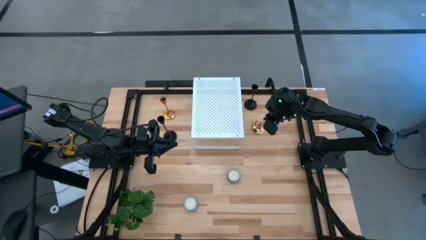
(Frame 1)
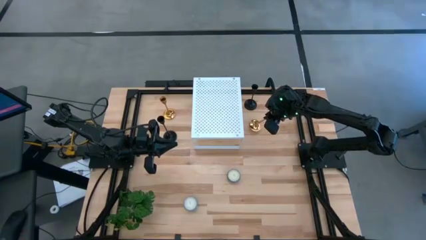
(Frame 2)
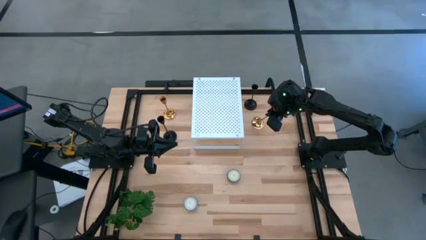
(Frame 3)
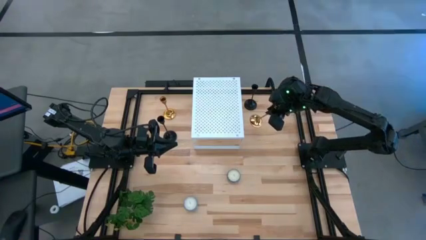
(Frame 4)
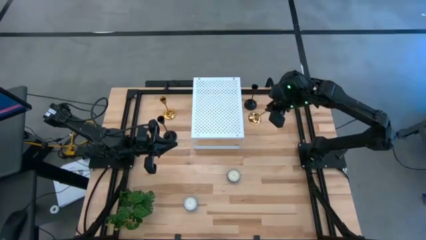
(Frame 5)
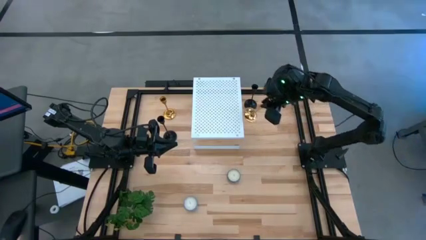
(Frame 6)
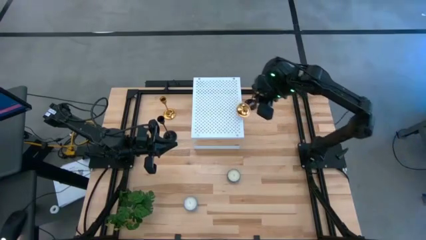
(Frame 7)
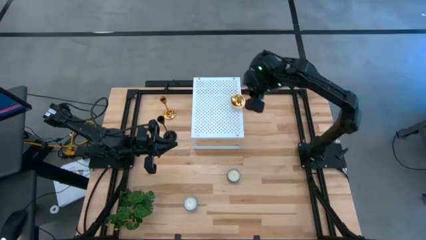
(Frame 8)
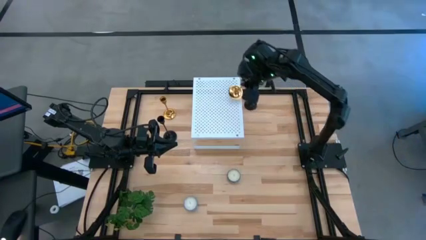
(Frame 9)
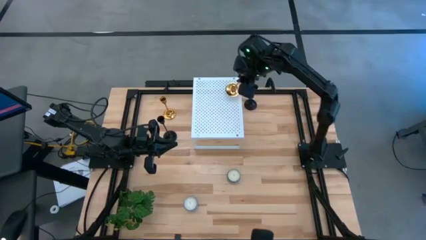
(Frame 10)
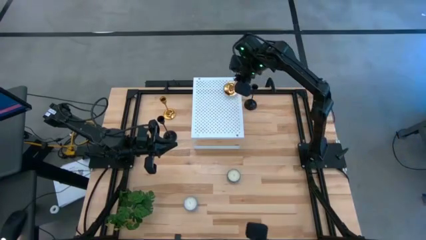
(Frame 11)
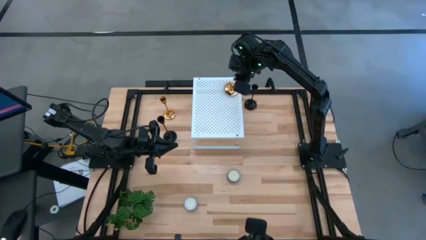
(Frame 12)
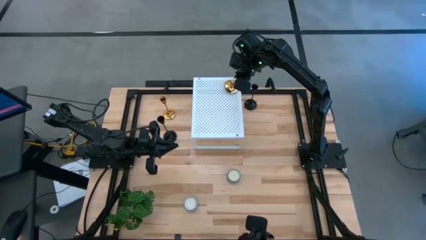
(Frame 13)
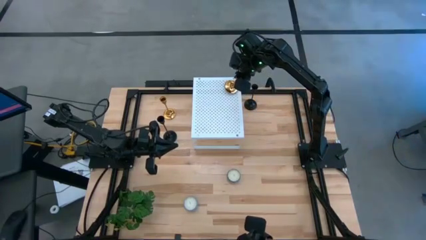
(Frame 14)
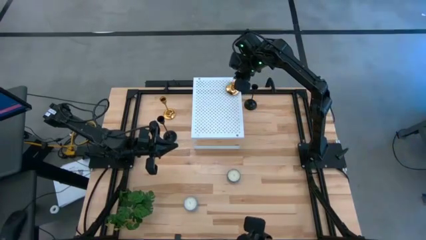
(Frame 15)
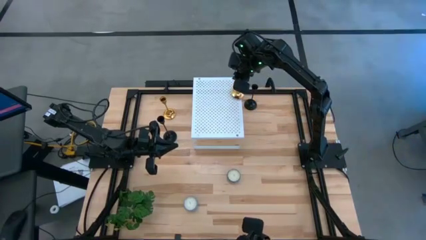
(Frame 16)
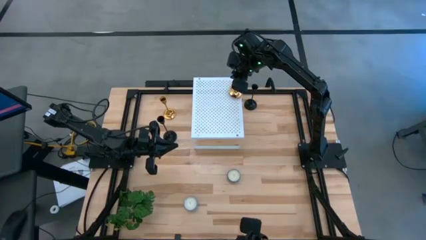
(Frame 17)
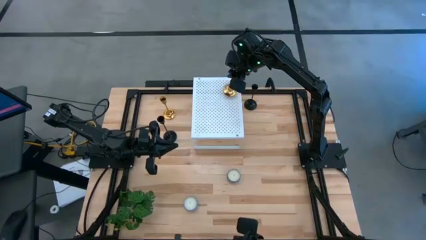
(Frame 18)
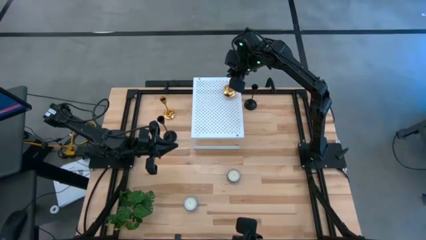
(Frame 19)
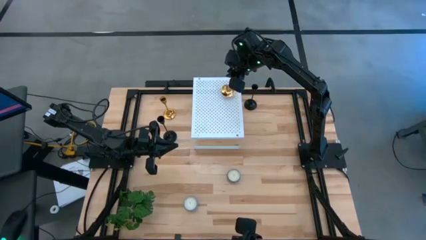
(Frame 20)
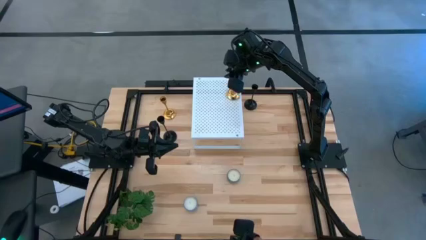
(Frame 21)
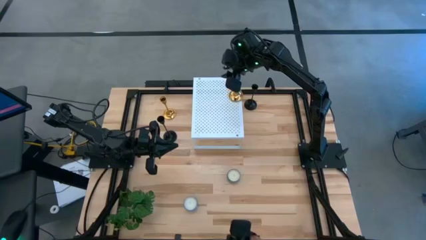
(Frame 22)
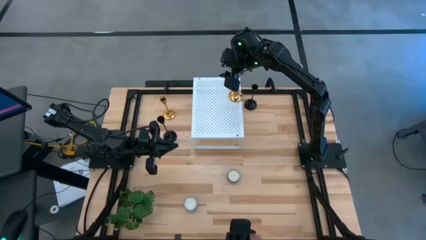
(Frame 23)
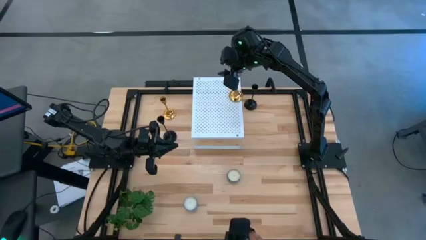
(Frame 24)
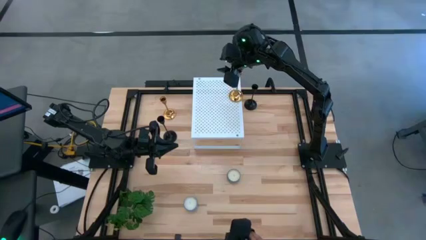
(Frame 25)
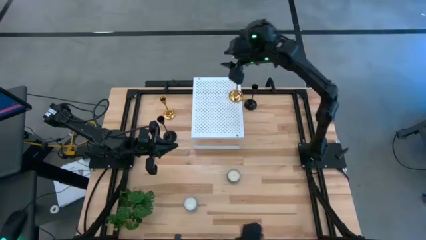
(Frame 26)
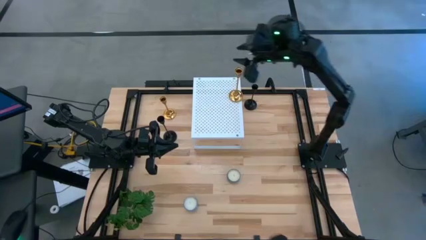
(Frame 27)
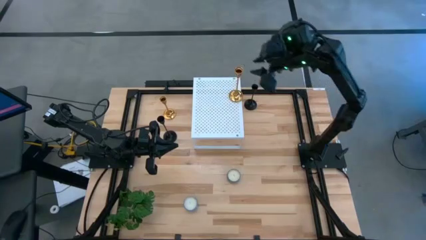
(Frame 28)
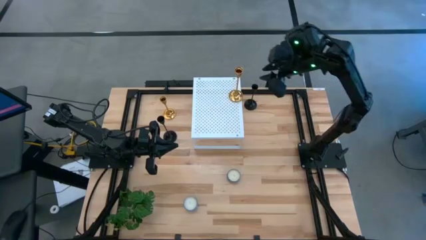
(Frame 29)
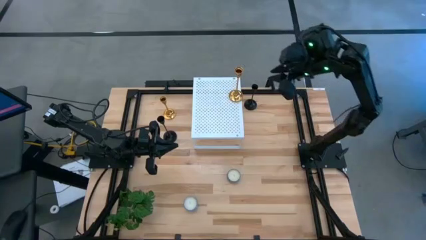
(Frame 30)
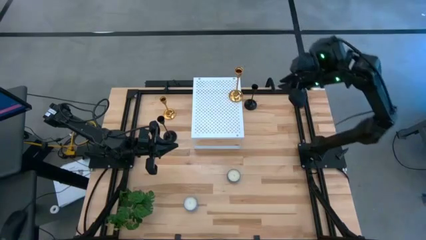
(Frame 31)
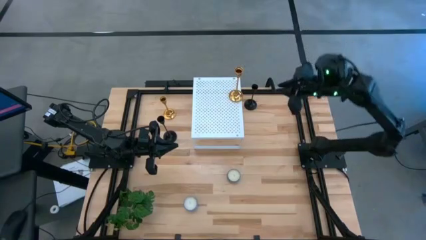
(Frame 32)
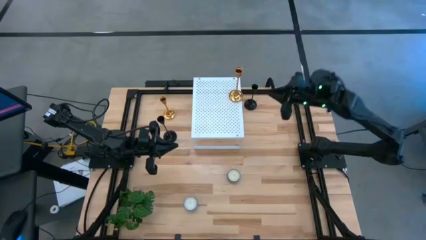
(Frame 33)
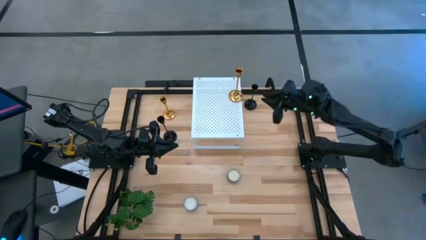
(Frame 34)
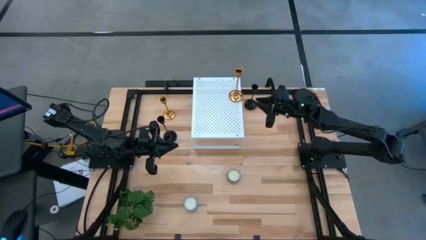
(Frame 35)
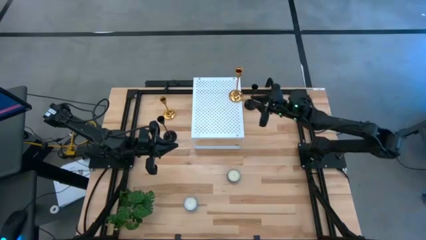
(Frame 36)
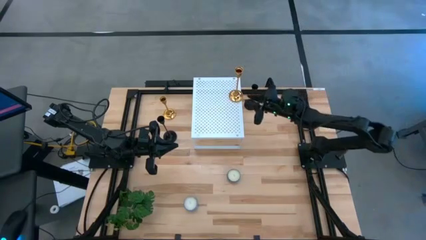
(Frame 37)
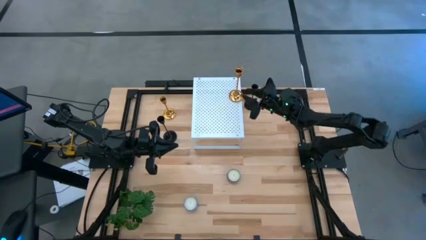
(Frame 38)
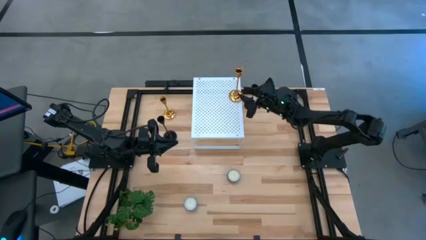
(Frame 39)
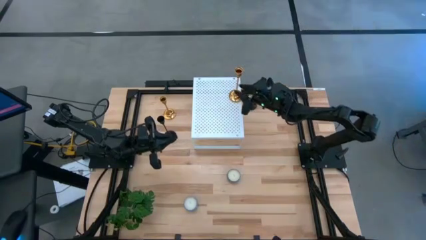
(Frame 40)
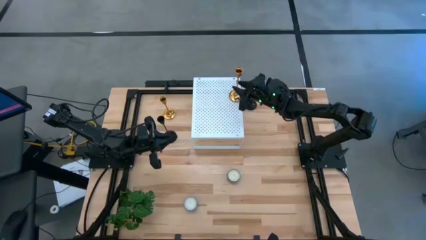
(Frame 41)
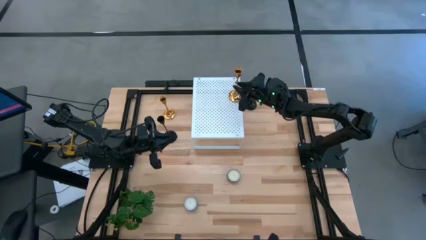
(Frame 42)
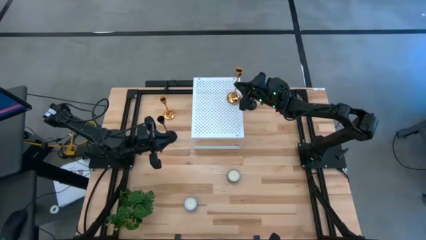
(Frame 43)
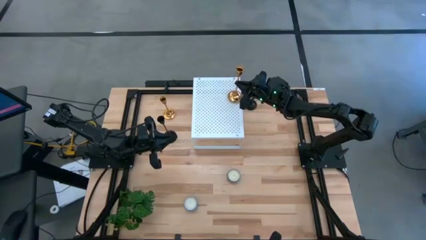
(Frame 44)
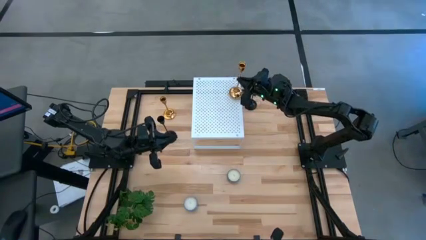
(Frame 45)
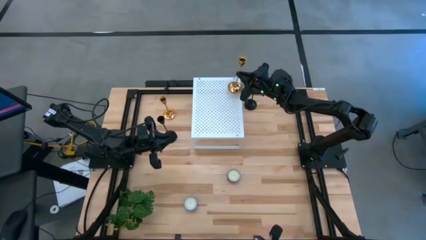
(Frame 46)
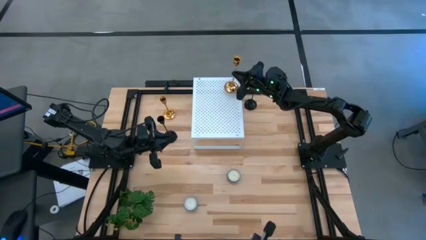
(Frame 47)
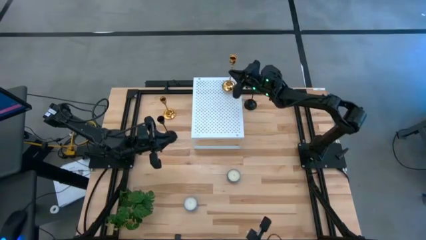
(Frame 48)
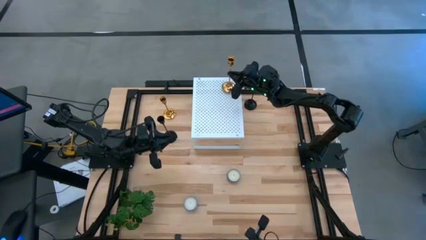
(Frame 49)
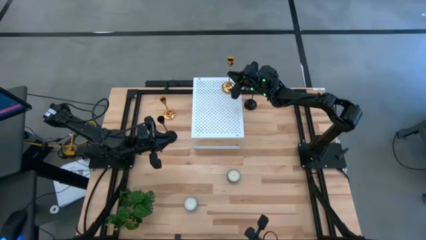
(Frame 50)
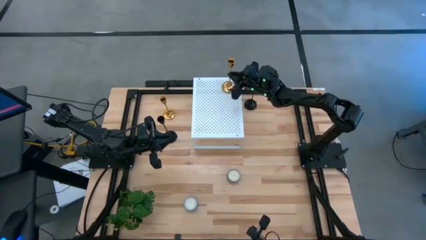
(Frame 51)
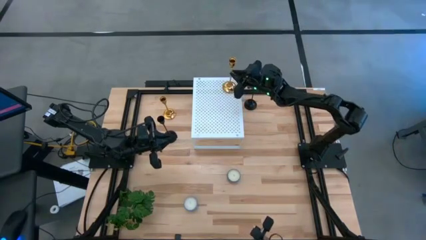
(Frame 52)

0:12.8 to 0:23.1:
Task: Pick & Place candle stick holders
Put the large golden candle holder on the shelf

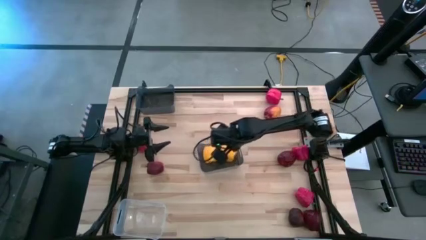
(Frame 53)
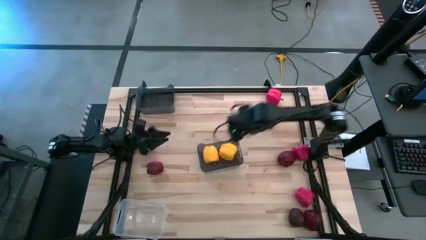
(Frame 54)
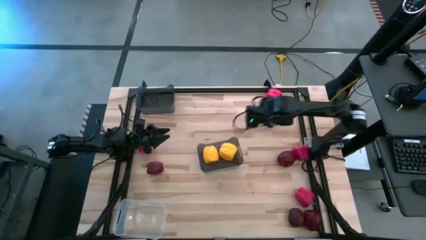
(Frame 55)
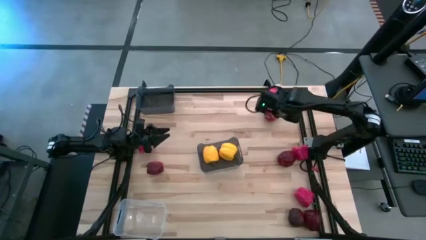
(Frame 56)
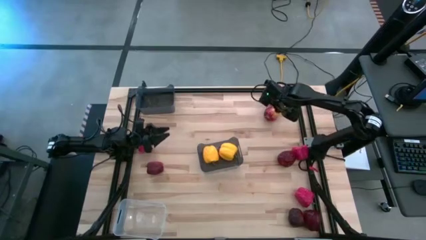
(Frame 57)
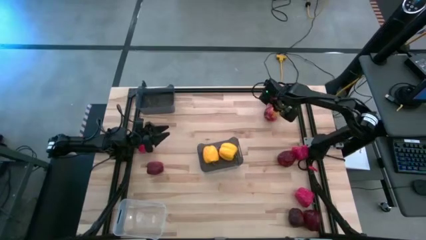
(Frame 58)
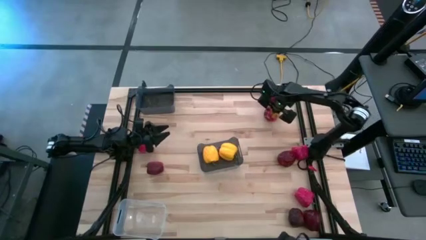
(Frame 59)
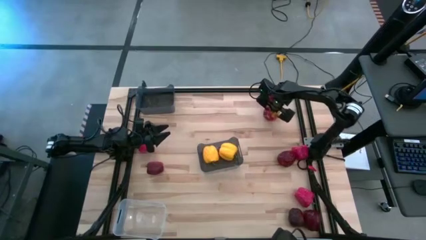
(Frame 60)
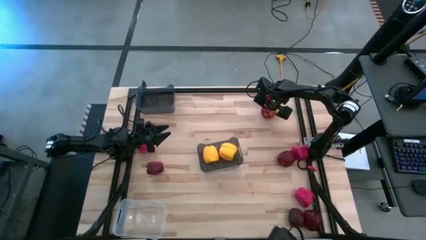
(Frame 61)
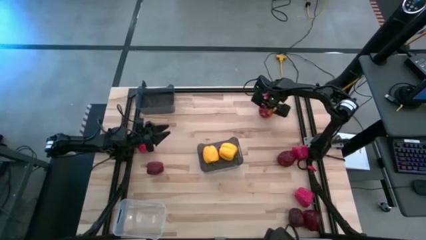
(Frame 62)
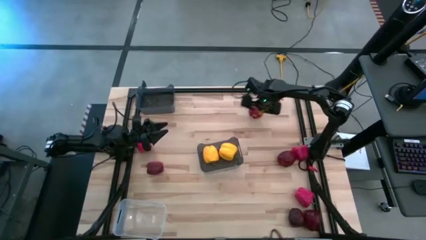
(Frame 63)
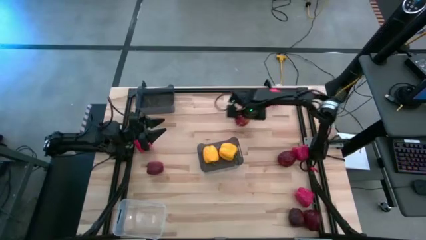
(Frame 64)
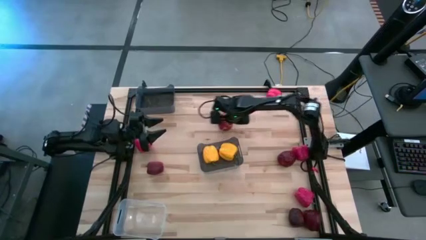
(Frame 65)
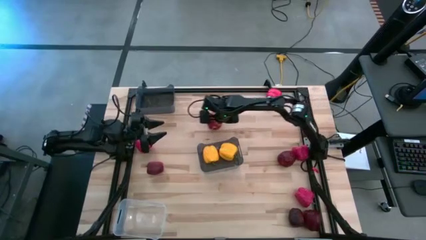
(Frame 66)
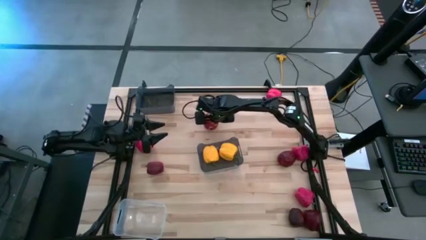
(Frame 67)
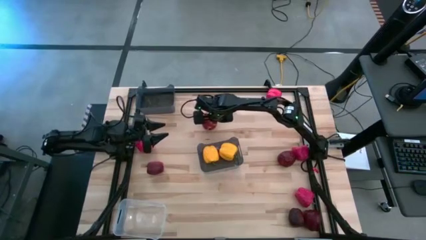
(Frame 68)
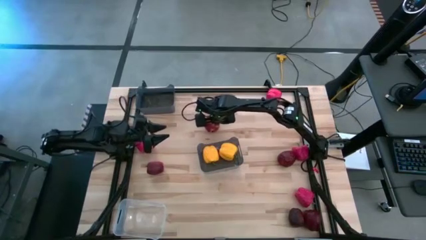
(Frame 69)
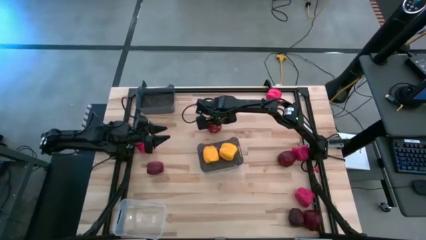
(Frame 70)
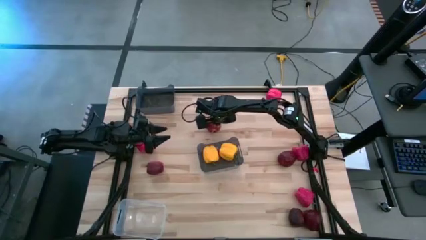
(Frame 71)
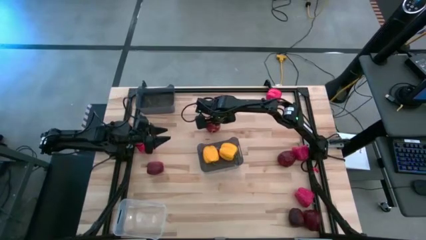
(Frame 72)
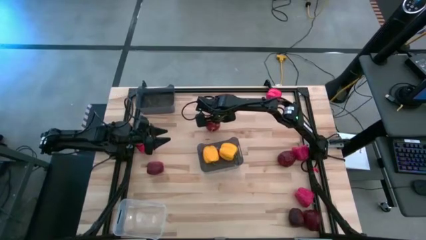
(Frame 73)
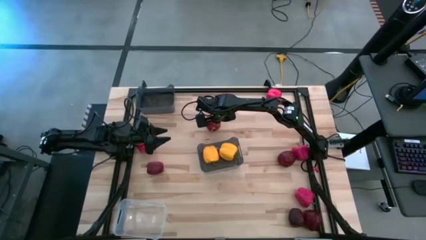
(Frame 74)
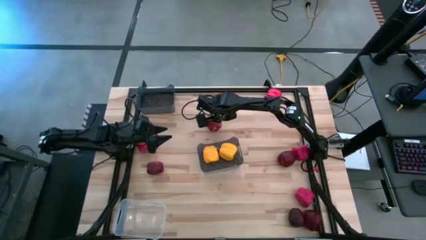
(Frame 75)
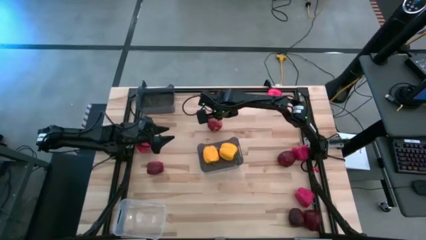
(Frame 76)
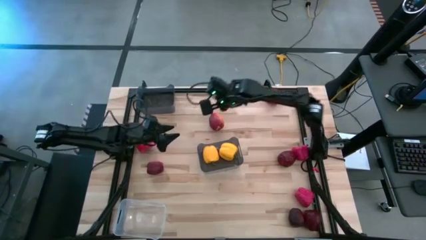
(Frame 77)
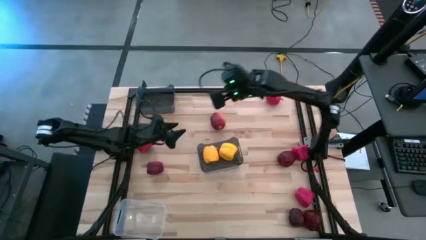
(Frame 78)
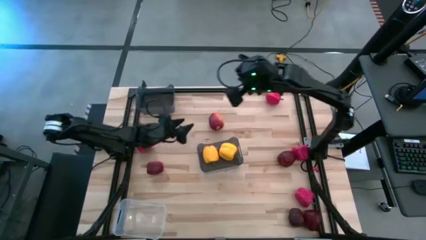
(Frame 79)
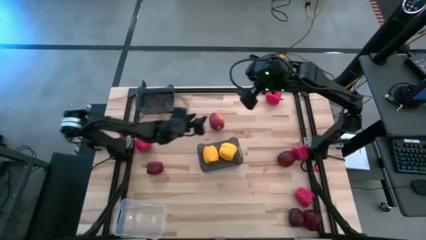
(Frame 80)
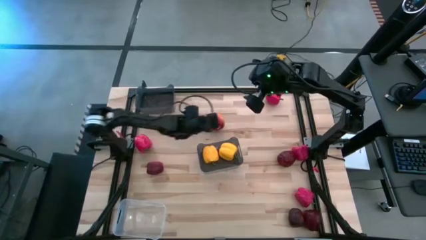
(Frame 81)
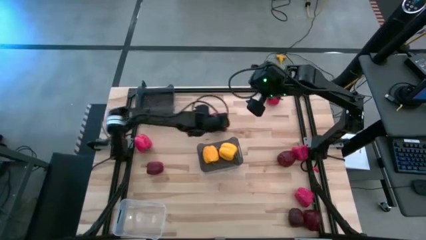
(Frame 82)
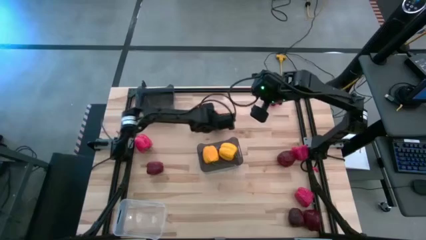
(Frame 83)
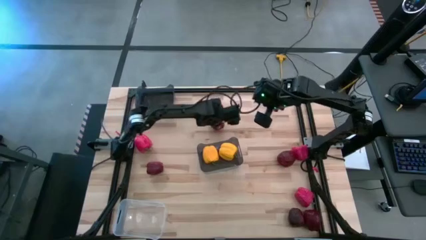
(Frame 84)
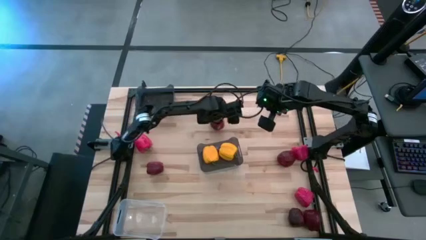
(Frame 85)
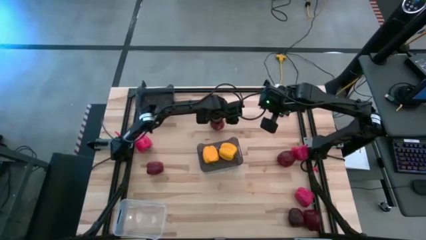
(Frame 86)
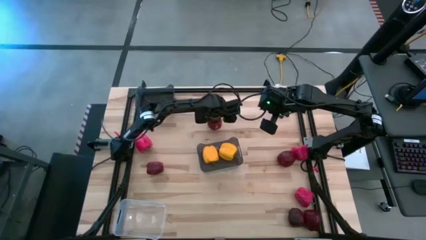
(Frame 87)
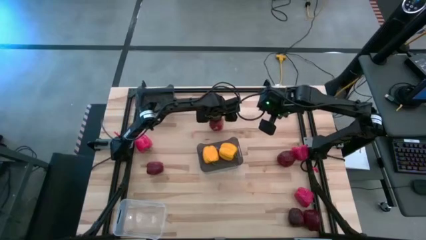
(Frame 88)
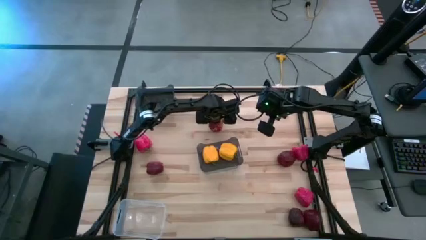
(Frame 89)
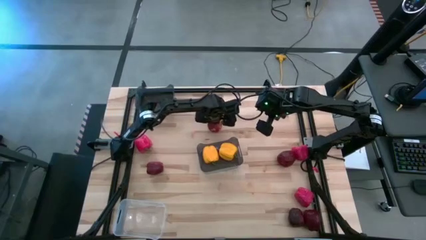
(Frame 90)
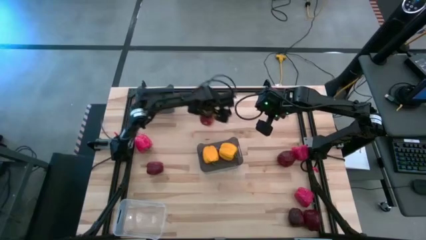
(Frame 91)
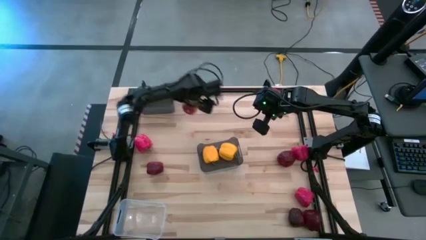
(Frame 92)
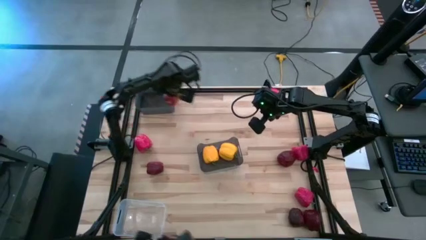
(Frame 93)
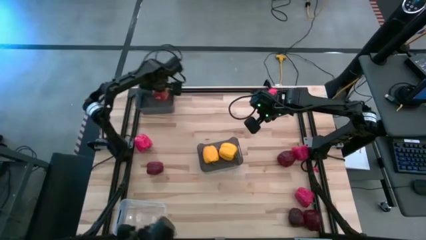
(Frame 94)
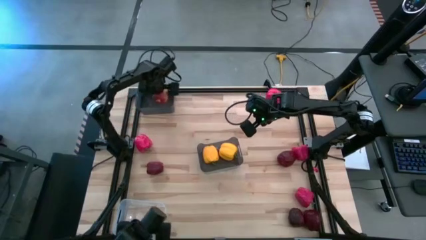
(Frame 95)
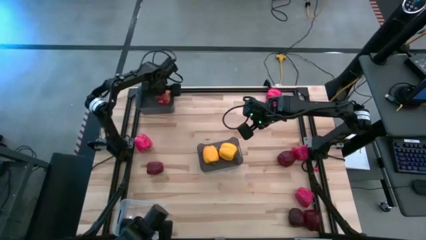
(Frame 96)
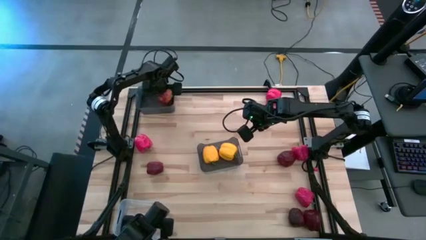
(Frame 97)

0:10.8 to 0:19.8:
Task: Sort produce into baskets
Put the top right apple into the top black bin
